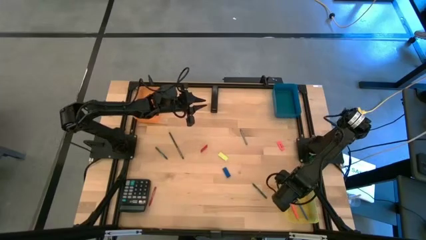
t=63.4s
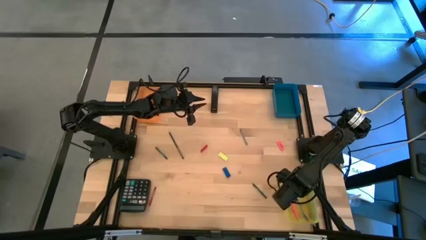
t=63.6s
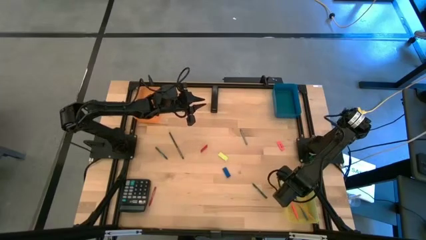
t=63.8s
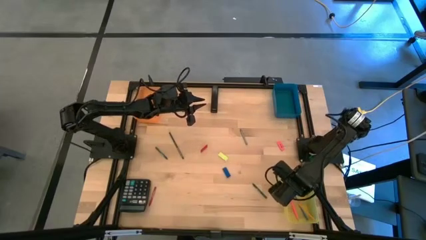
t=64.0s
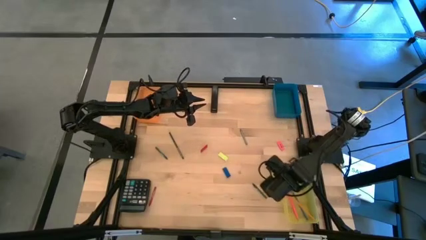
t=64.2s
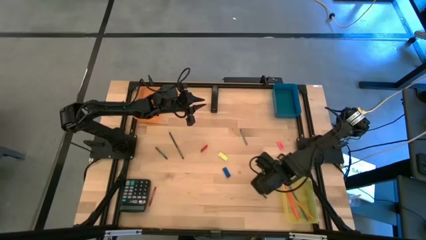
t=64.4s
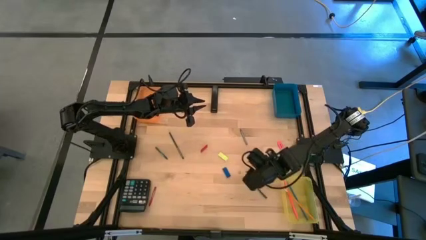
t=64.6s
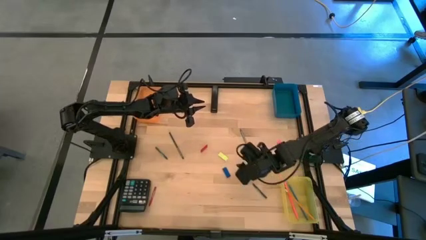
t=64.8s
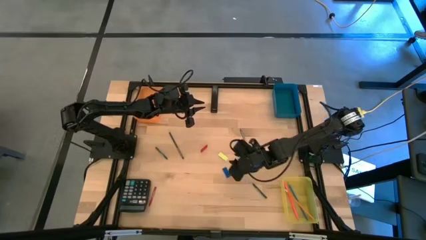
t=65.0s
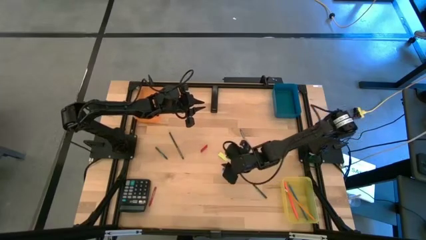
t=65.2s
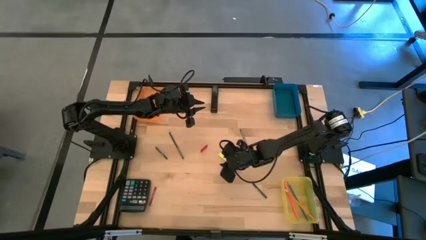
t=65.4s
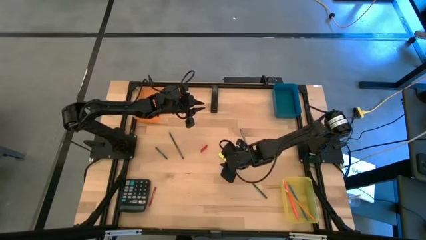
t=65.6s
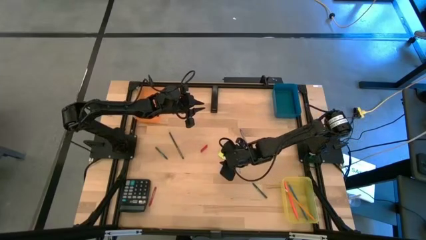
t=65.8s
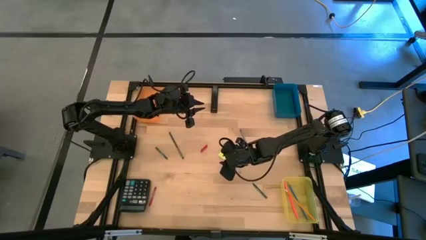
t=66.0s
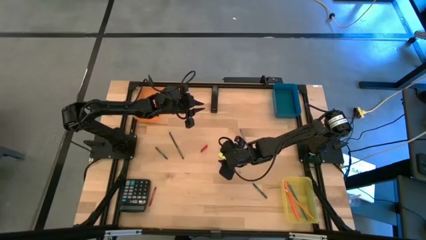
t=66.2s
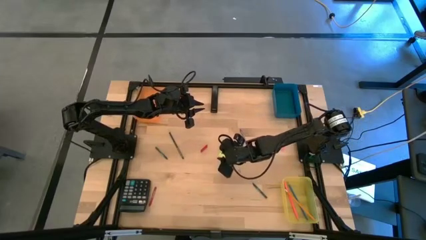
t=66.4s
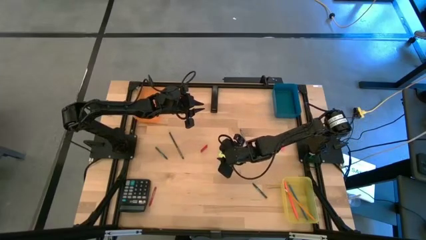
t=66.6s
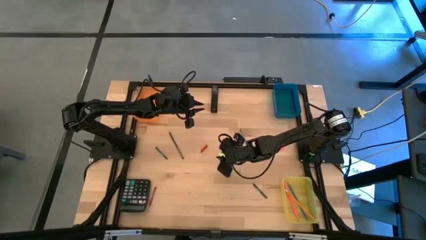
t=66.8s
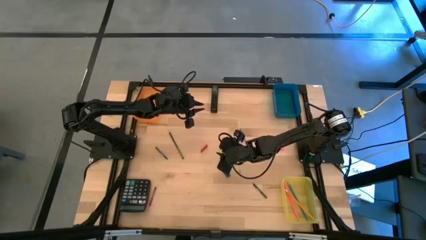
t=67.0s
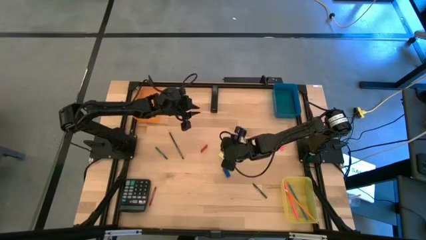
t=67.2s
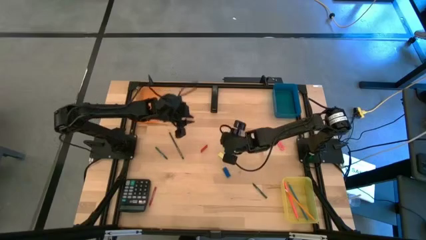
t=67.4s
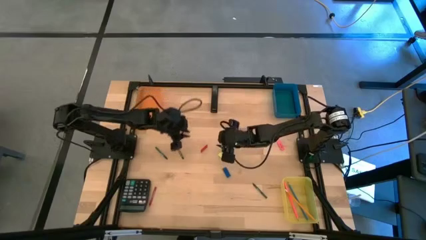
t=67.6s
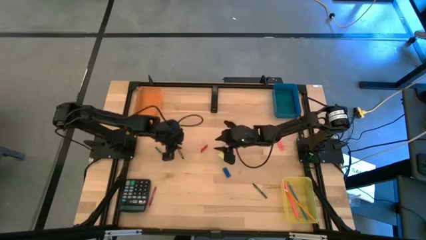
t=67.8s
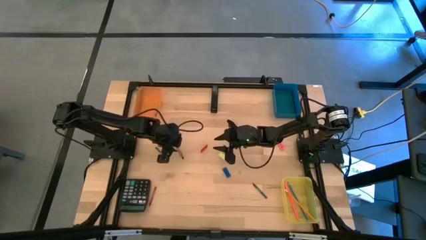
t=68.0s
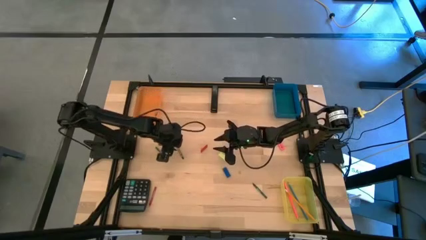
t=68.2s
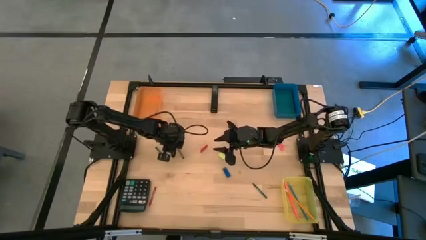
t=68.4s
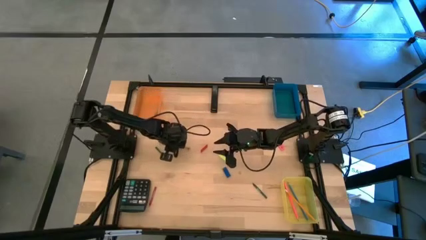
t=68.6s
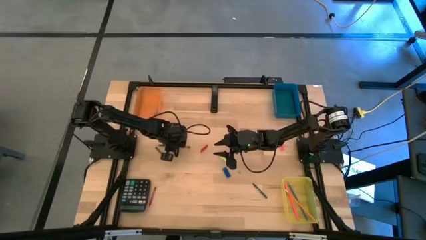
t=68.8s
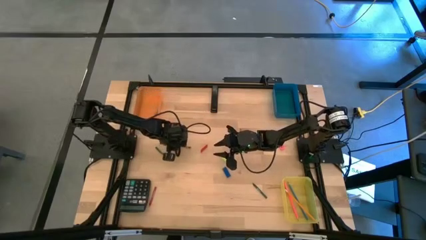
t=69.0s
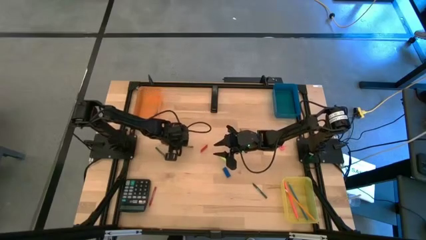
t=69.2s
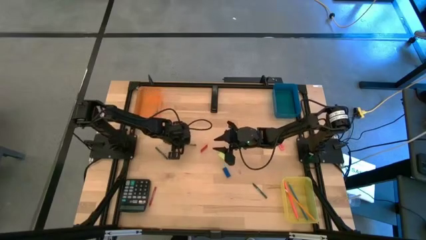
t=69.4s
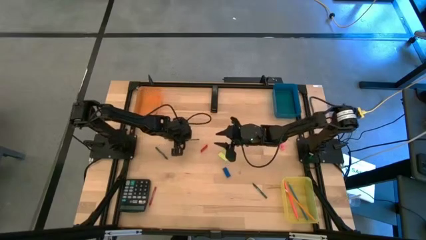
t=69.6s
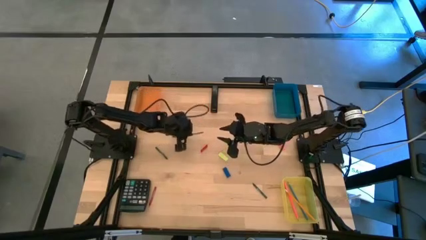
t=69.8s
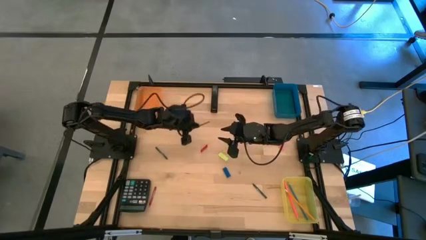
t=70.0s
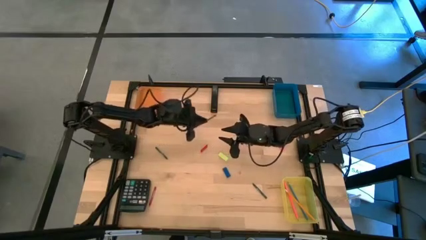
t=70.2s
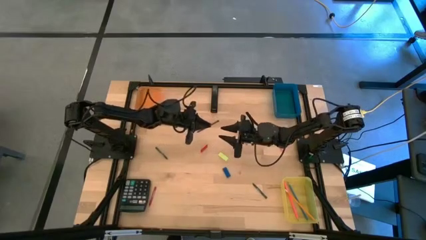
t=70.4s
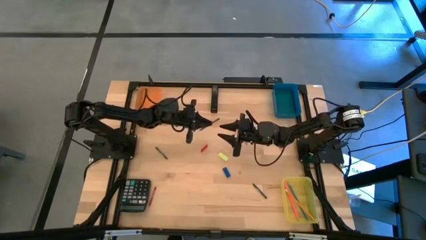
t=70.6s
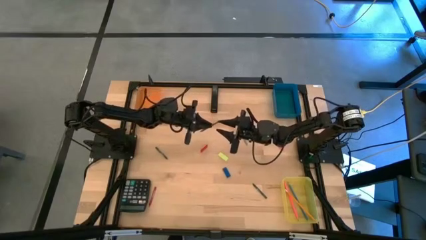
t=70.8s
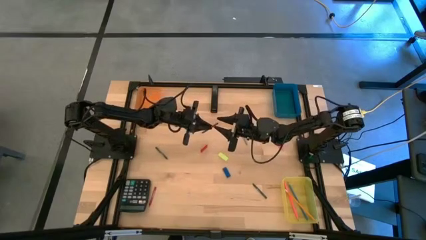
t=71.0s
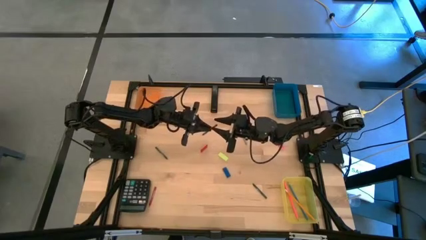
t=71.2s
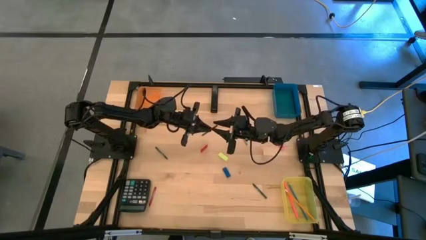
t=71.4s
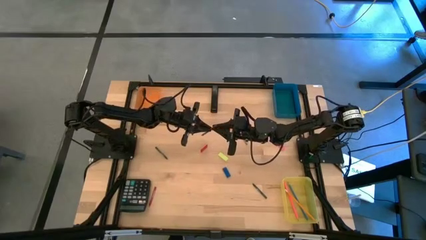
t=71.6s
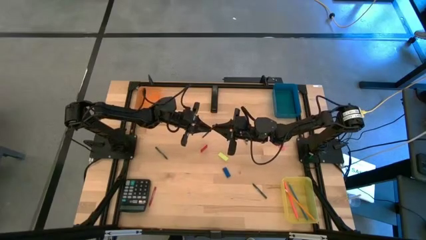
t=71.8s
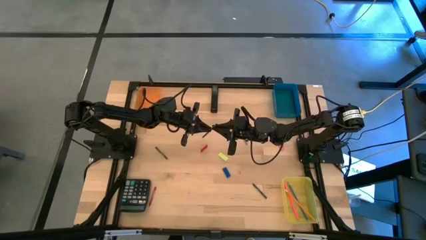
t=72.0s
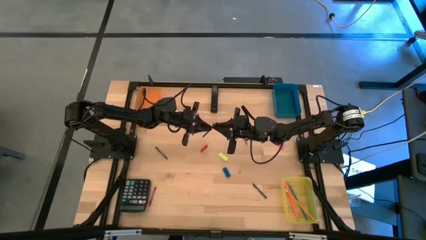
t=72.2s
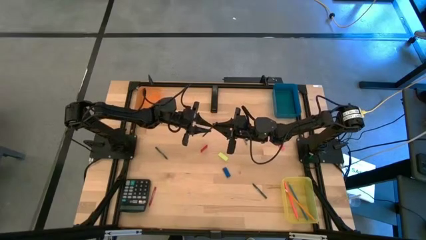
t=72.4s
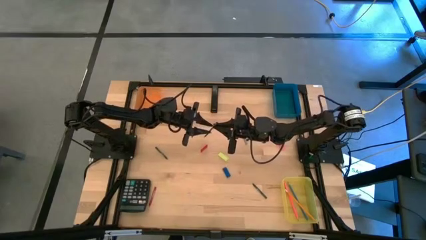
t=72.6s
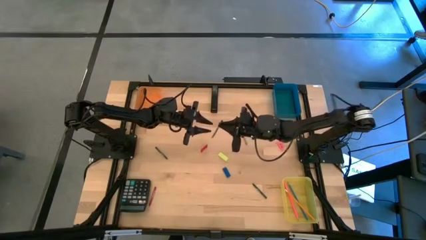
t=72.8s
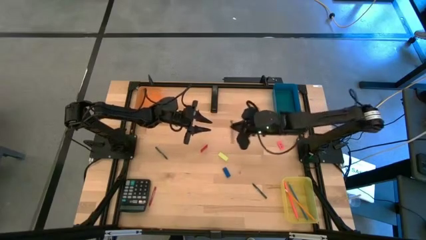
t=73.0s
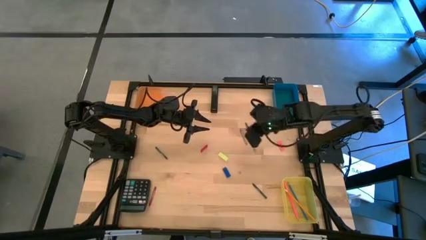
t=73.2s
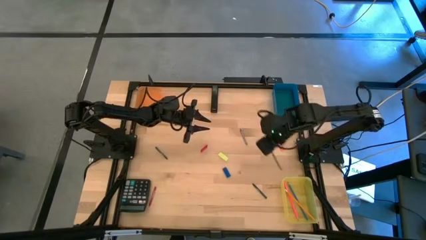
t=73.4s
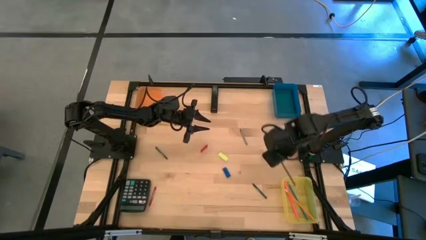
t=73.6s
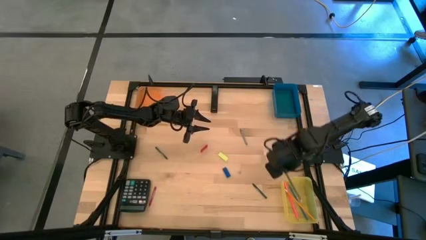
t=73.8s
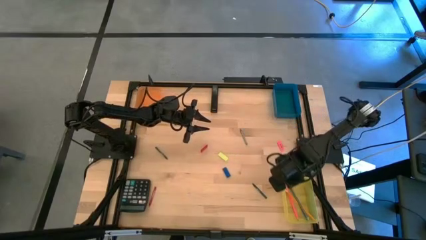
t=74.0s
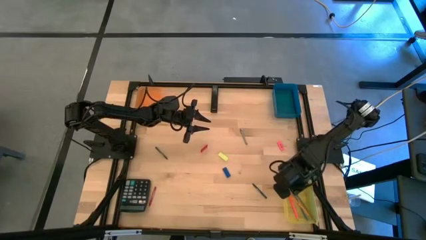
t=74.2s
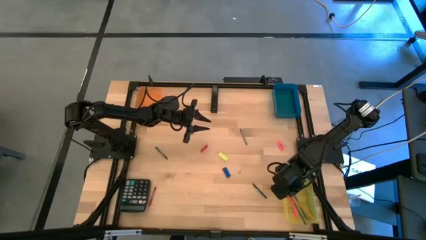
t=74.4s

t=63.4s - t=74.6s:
Task: Sort crayons/erasers/pens/pencils in bins
Put the black pencil into the yellow bin

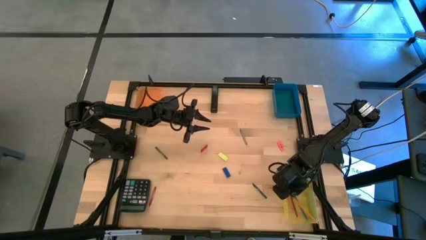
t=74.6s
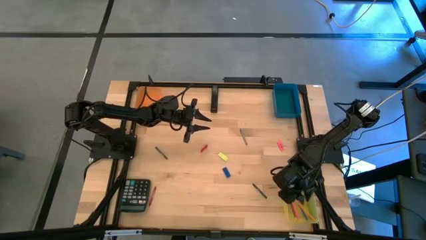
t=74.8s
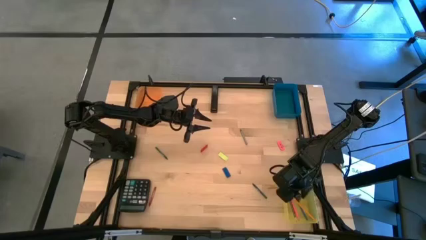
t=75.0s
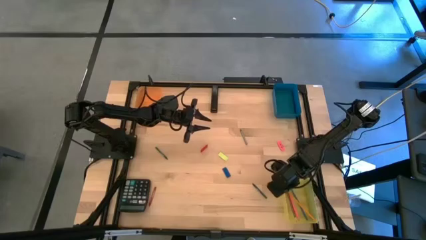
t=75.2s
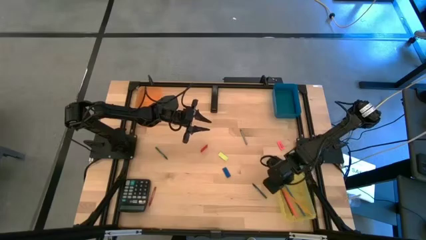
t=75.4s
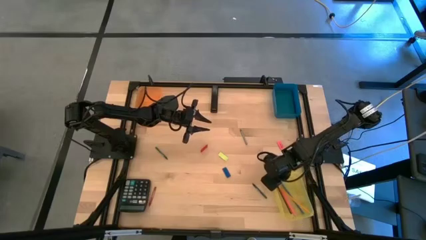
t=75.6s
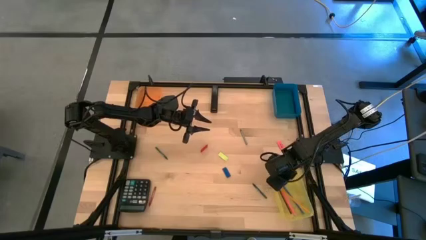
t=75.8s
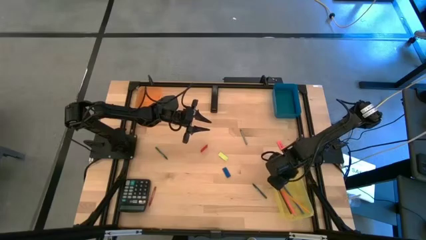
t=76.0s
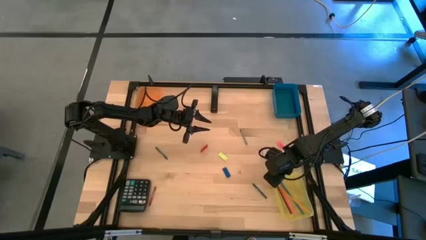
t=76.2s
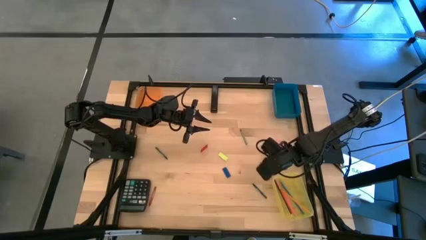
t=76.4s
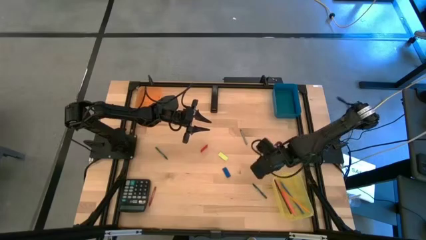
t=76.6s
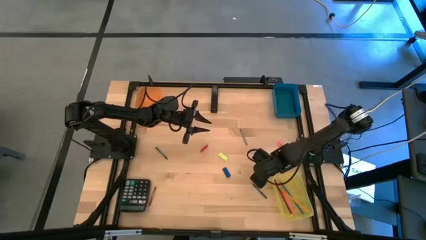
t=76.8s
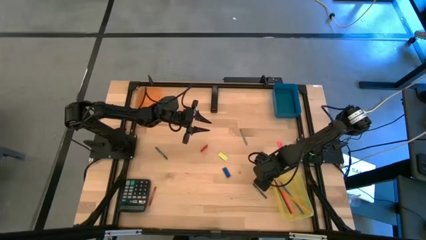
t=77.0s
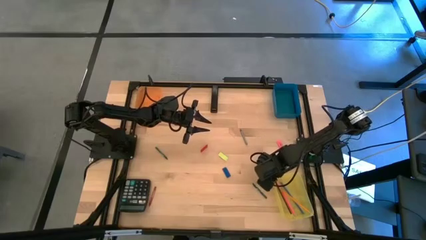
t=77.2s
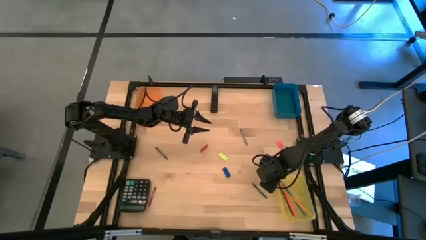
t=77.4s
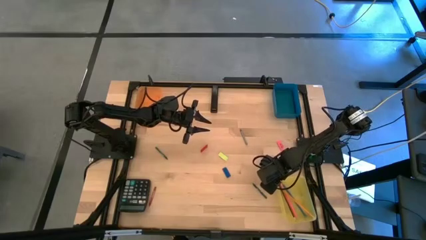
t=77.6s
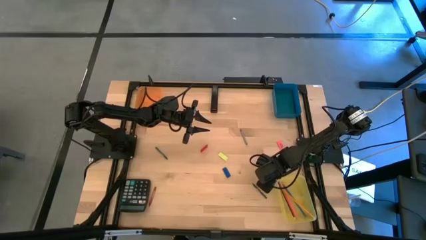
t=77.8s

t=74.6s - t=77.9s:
Adjust the yellow bin

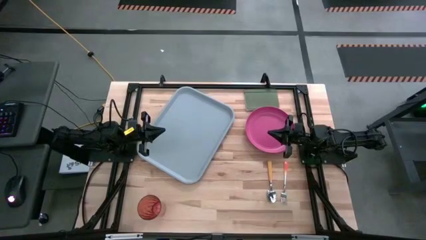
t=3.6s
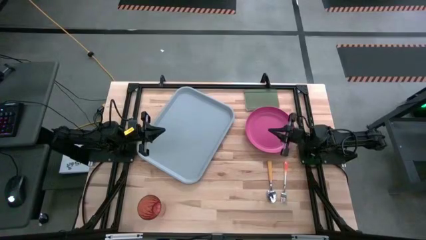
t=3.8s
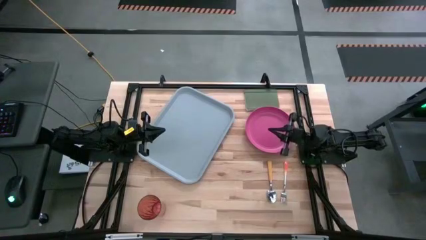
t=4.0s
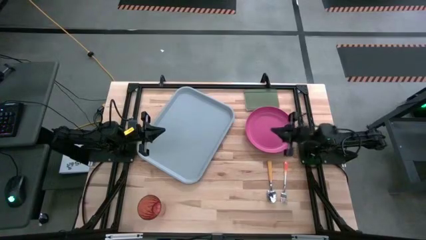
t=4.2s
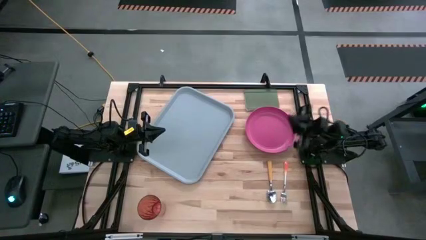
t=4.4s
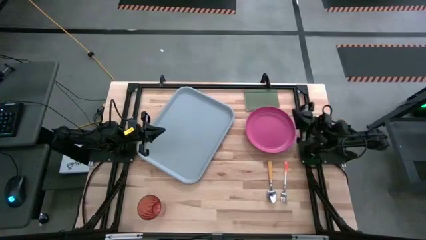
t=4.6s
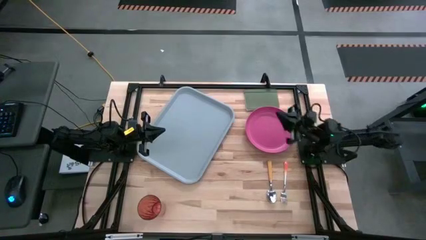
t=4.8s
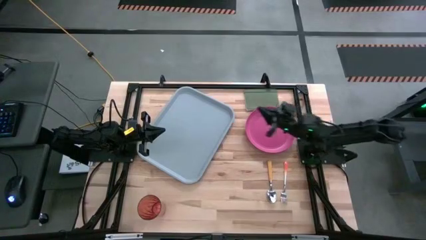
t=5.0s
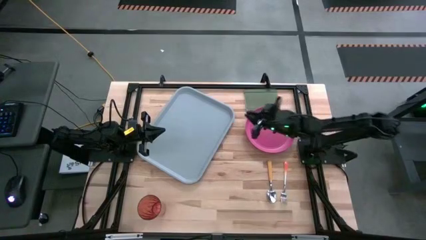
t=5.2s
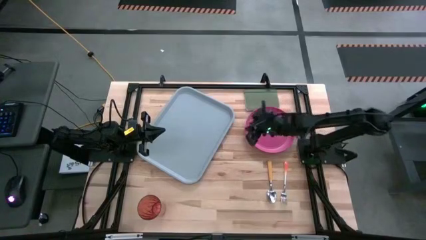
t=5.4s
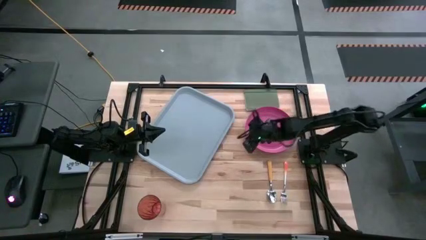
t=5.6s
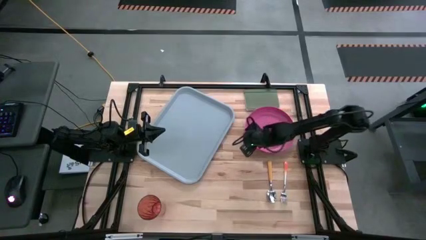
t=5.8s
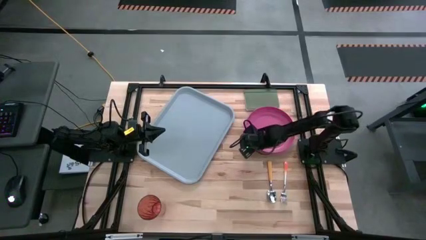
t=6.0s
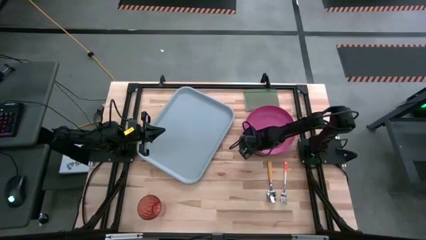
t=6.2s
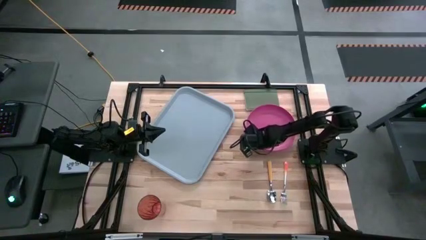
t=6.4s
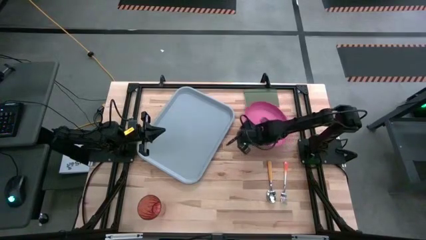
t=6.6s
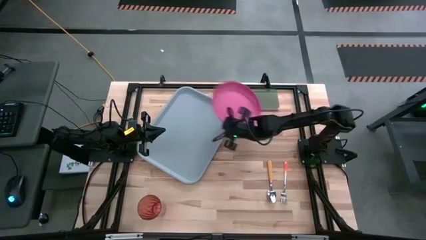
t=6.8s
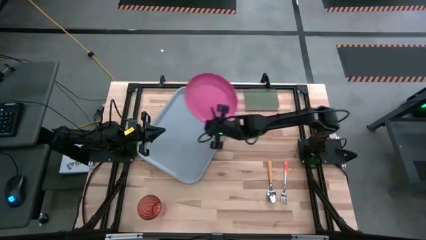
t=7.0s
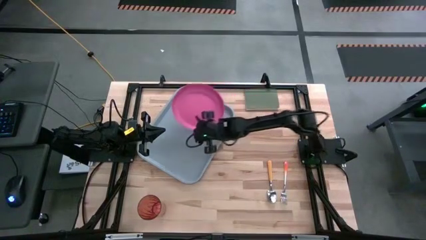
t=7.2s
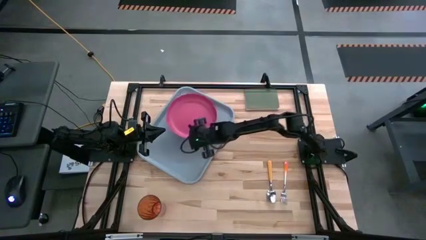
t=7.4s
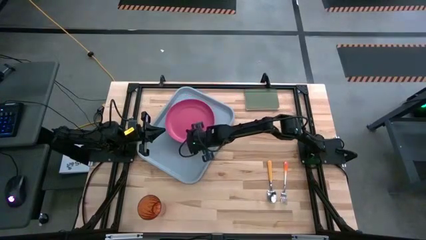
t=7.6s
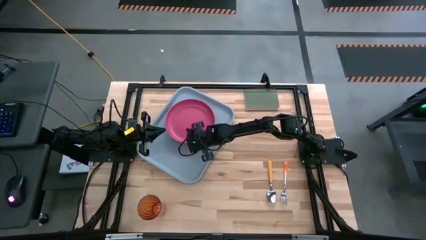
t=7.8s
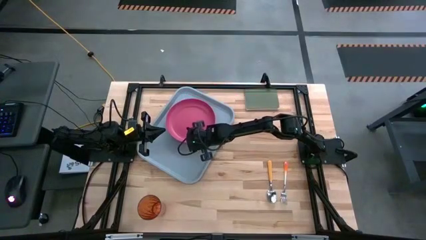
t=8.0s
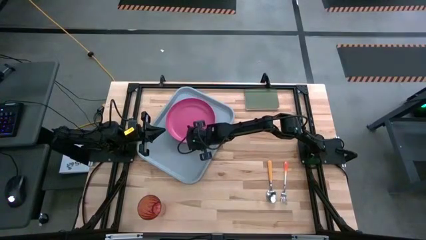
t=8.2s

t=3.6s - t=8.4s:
Task: Pick and place plate/cup/fork/spoon on tray
Put the pink plate on the grey tray
